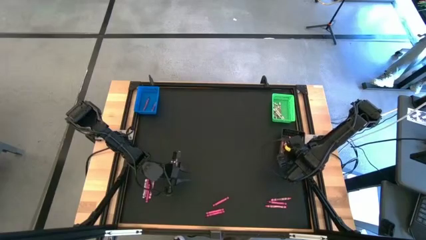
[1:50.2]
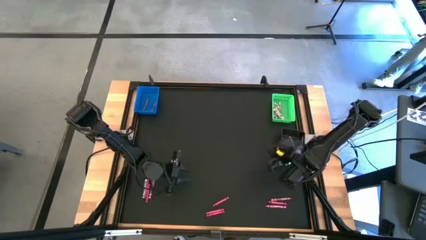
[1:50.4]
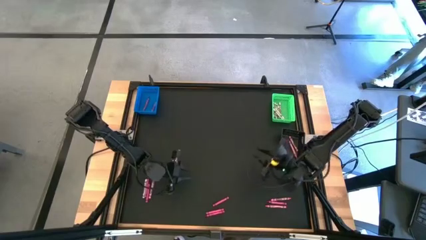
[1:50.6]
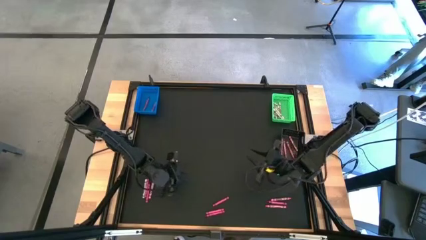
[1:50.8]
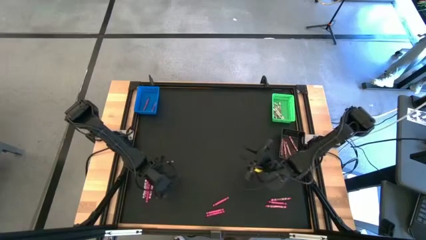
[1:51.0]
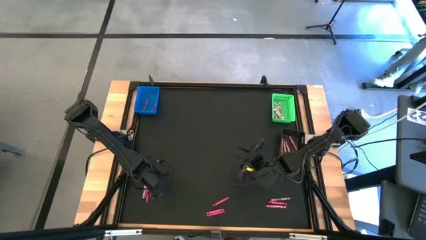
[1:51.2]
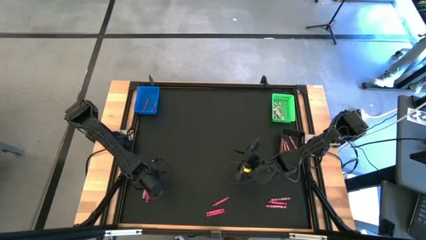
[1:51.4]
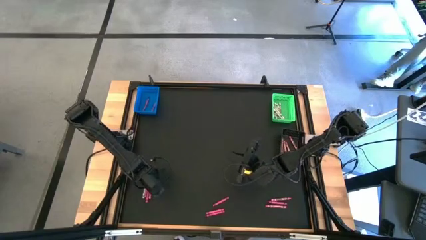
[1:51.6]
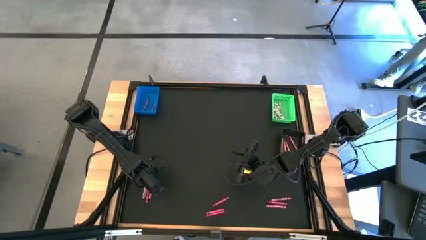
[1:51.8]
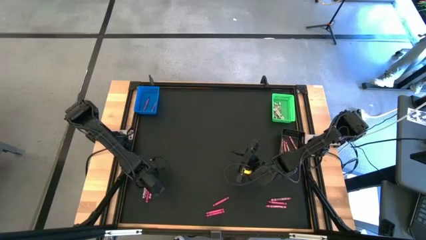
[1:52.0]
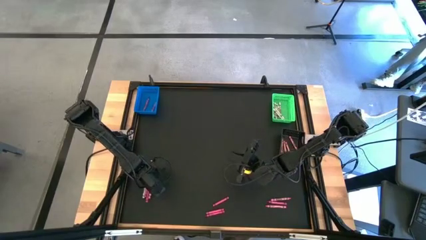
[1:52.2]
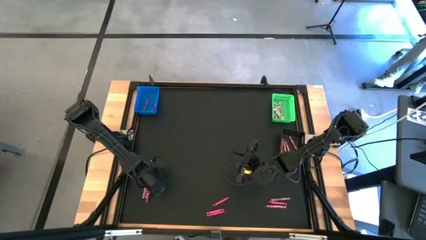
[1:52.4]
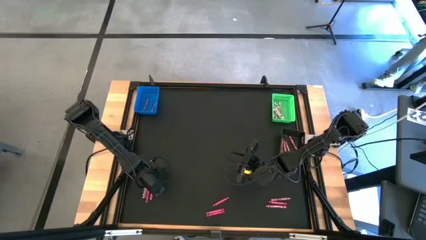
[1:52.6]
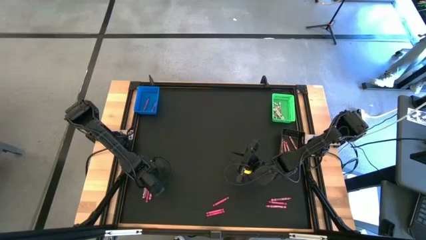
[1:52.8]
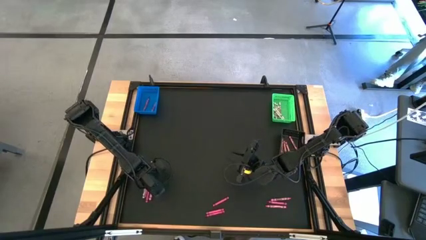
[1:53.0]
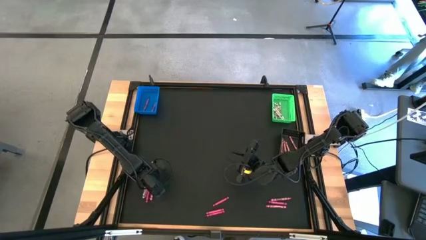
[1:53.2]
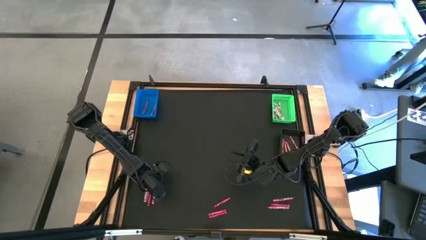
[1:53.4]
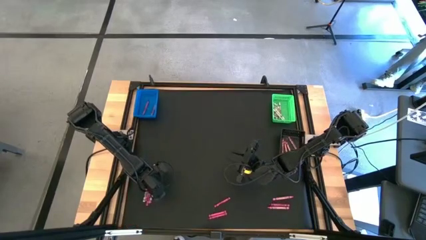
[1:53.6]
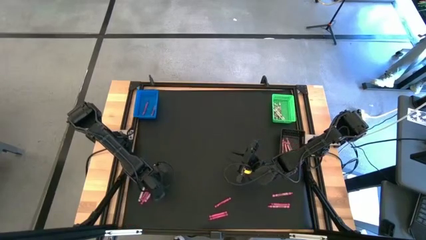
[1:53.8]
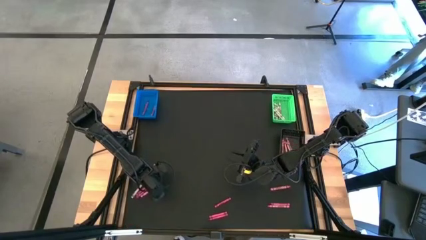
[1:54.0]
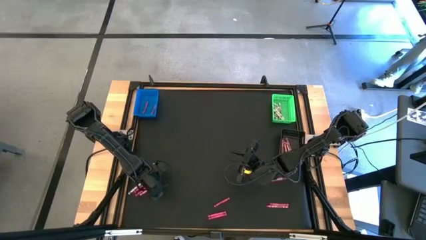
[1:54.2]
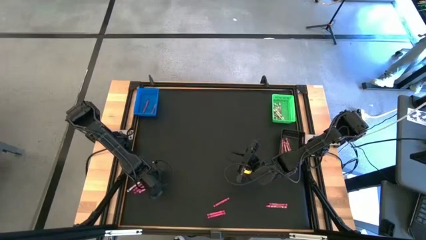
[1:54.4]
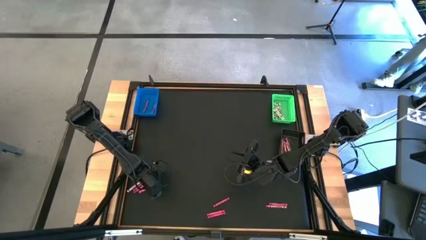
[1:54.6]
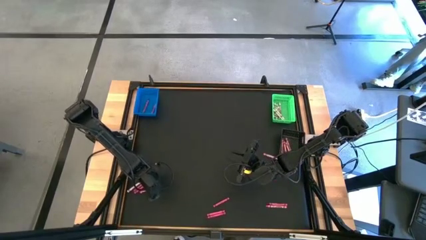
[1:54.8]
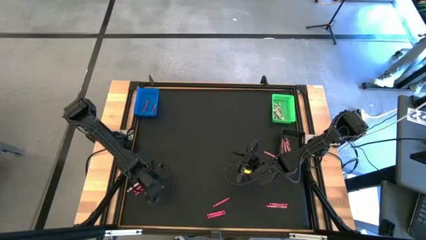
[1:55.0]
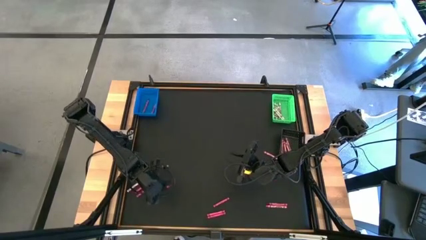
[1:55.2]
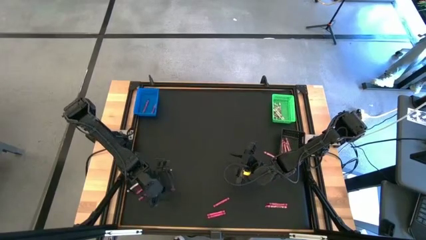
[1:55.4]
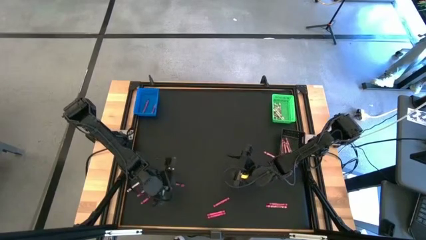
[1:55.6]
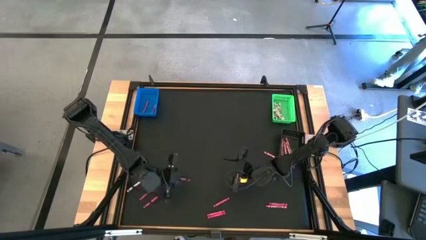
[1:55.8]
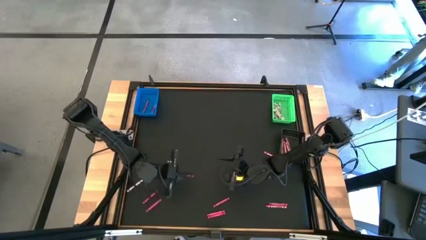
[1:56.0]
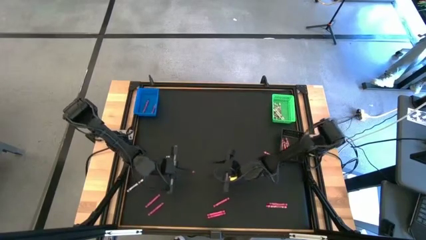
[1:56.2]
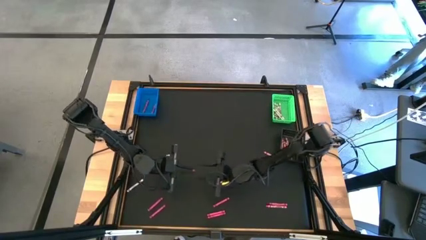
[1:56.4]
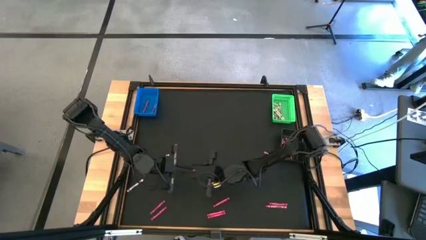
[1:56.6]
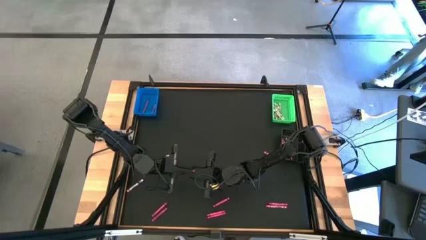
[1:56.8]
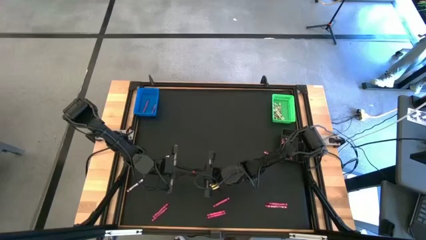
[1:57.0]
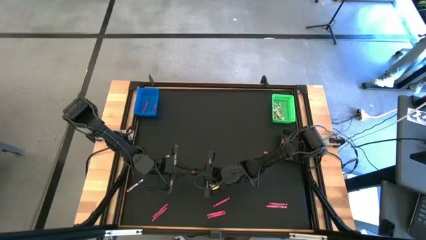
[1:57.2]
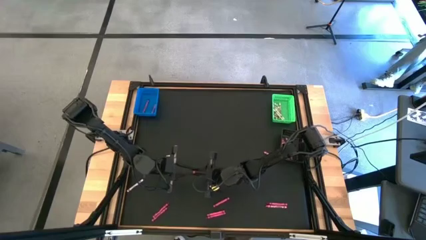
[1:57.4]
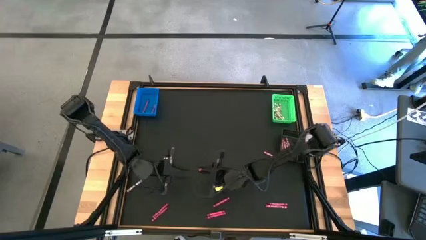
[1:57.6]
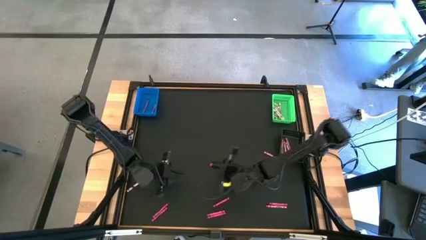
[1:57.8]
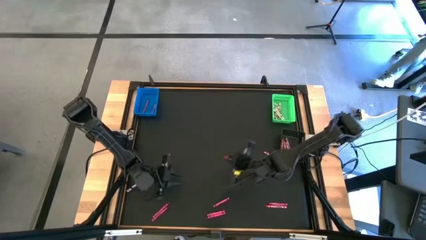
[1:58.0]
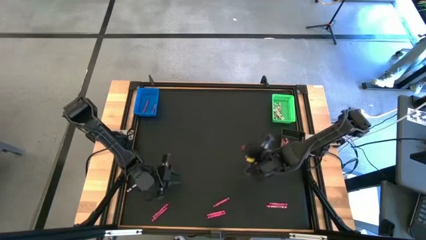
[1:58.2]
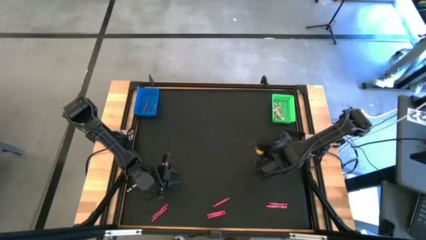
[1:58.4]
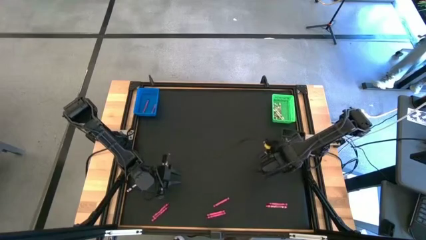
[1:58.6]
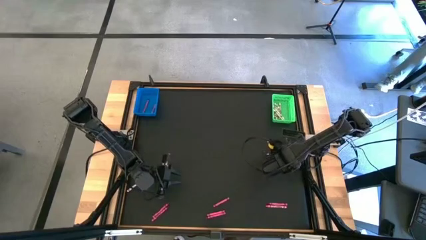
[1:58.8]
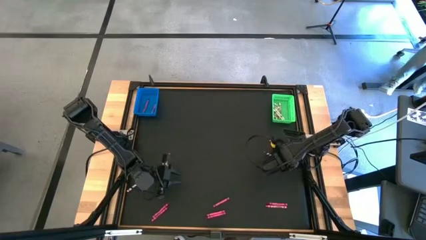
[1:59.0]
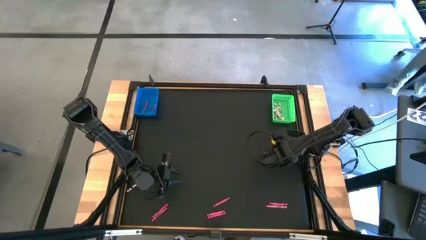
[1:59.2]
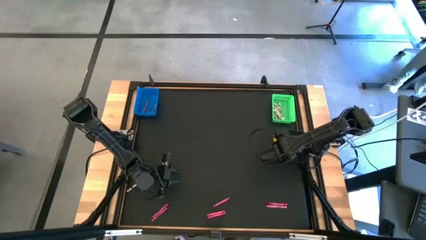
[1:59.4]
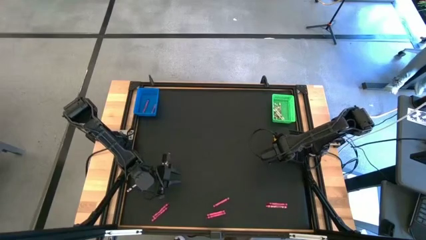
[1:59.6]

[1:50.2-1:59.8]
Task: Sort crayons
Put the pink crayon into the black bin

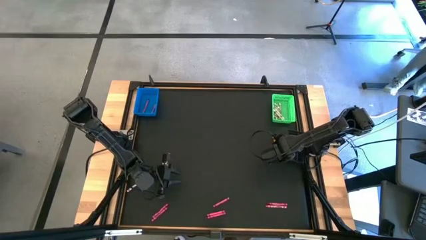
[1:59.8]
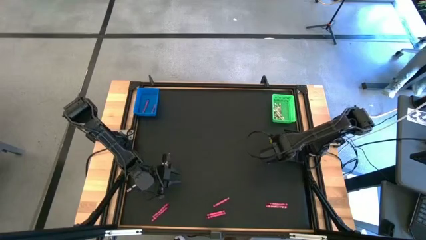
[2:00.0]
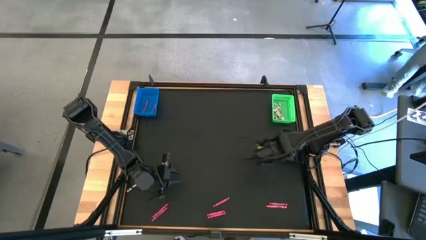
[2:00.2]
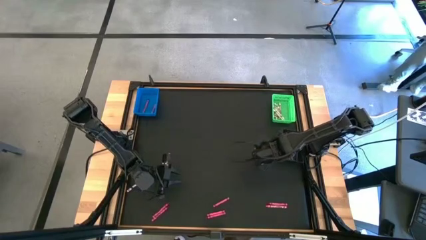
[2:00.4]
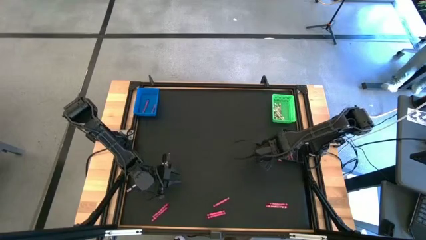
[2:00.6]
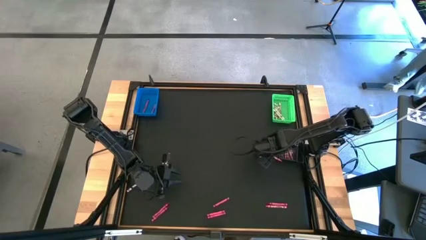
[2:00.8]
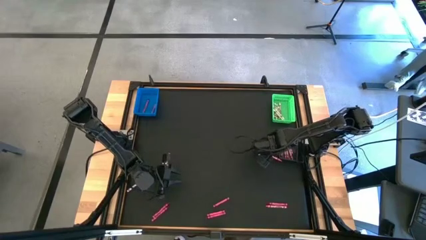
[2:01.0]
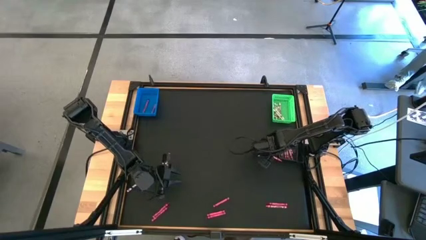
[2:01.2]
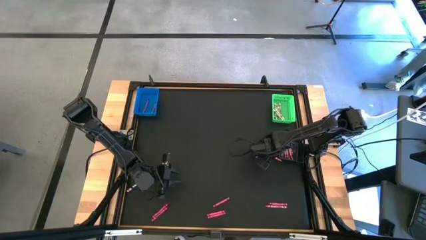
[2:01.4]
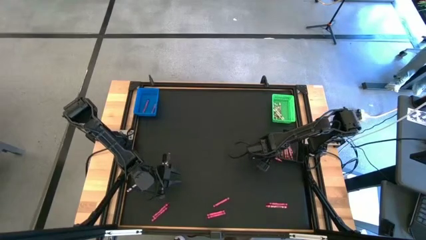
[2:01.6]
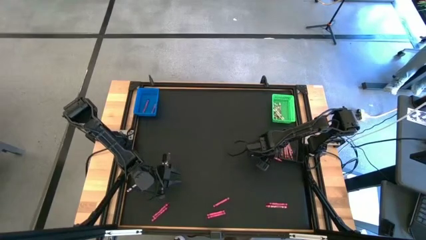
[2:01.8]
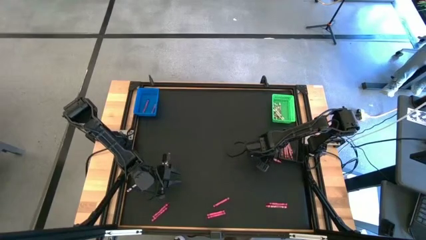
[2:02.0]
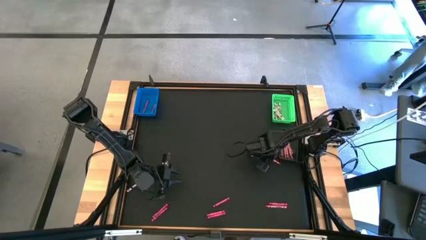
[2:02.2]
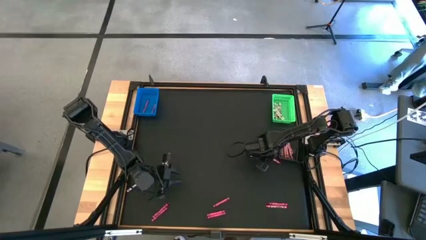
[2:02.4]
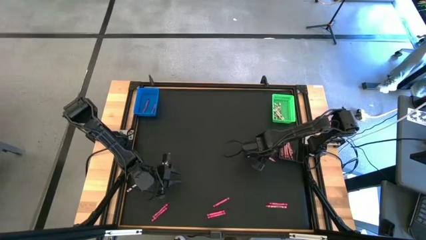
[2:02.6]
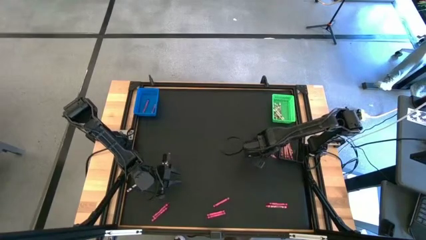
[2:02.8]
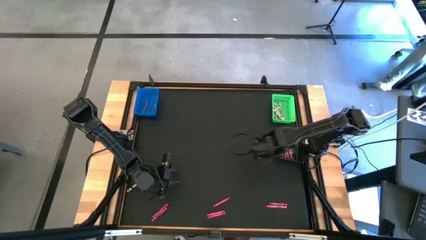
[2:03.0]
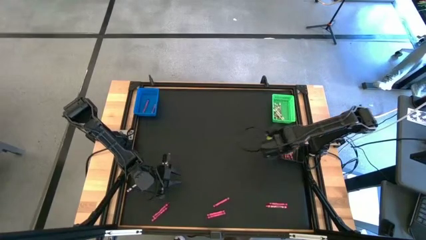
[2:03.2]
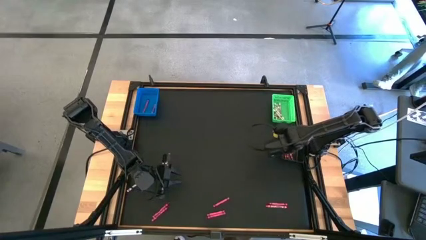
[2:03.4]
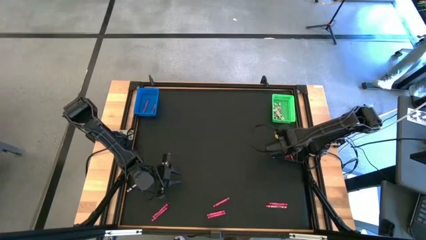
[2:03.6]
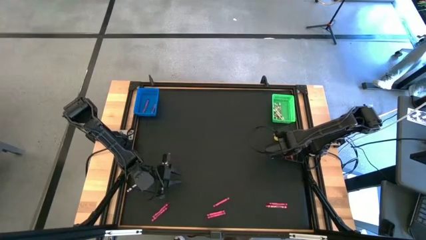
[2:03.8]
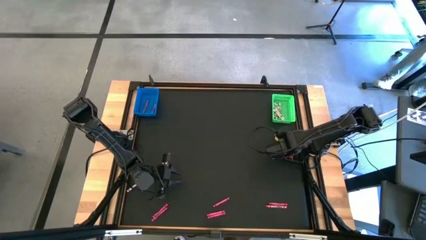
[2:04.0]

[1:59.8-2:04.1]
Put the pink crayon into the black bin

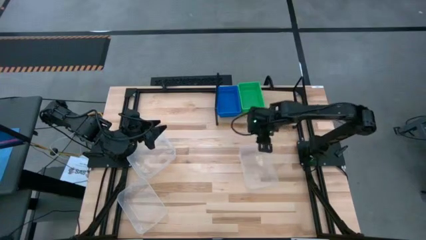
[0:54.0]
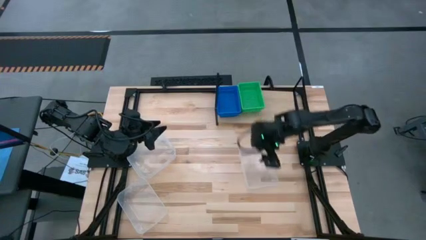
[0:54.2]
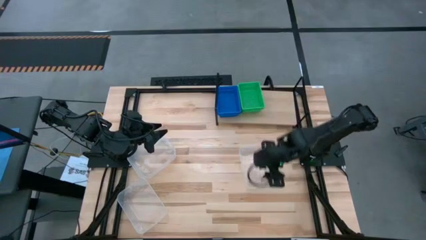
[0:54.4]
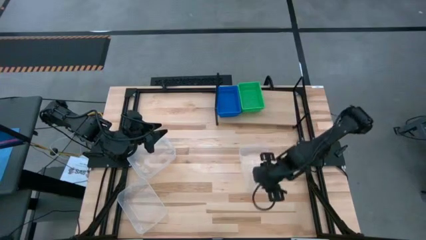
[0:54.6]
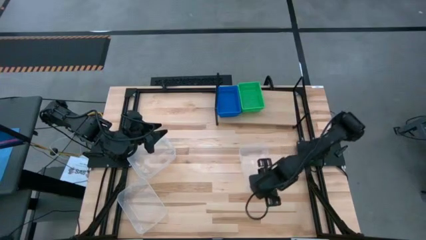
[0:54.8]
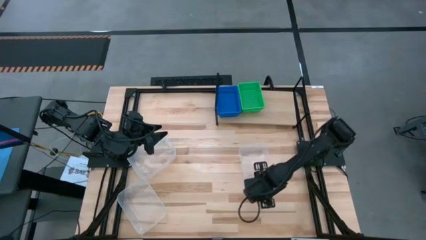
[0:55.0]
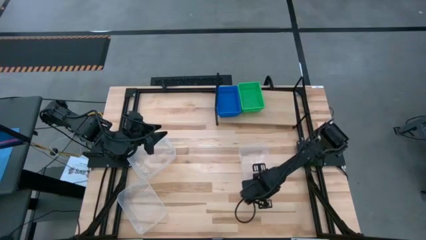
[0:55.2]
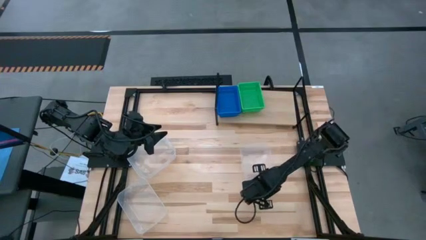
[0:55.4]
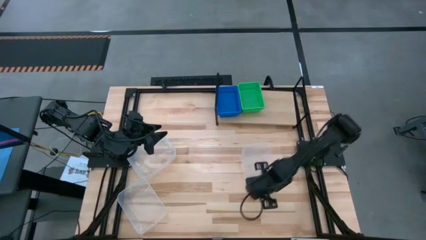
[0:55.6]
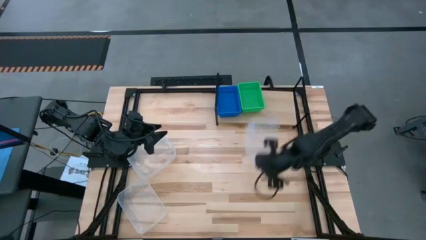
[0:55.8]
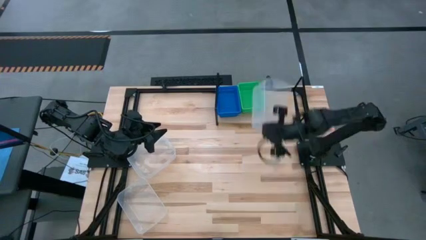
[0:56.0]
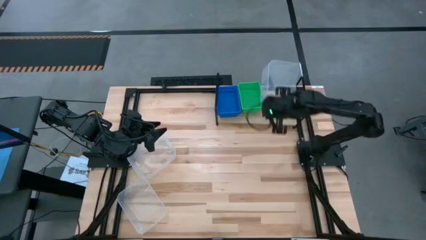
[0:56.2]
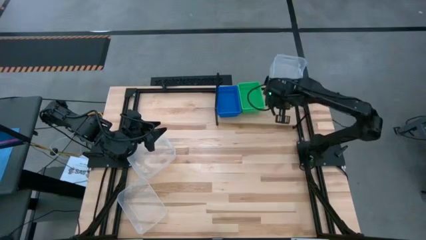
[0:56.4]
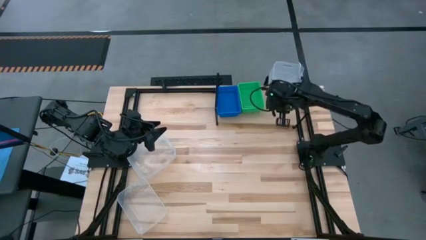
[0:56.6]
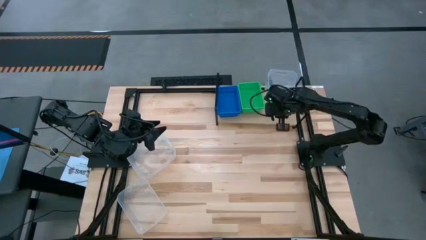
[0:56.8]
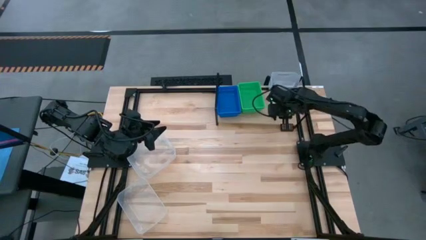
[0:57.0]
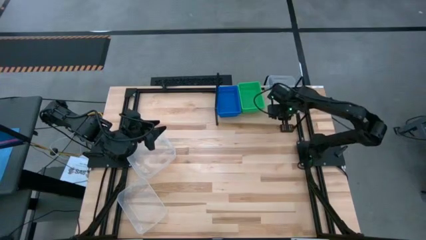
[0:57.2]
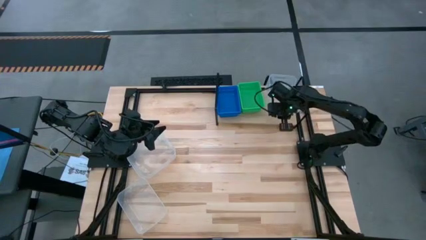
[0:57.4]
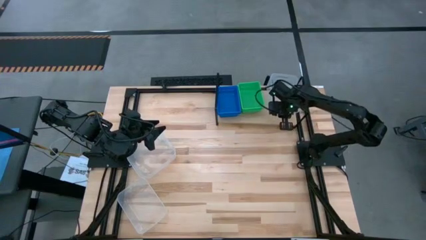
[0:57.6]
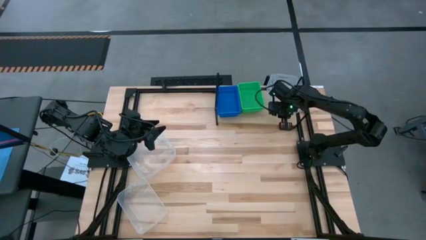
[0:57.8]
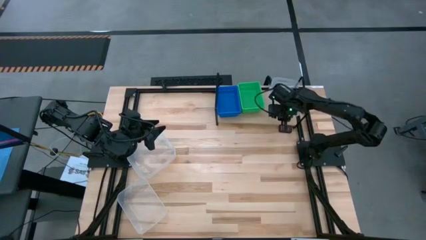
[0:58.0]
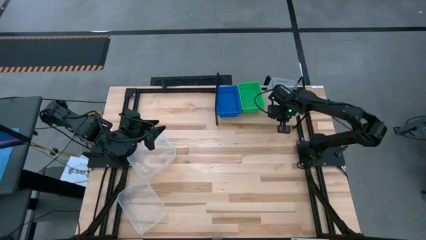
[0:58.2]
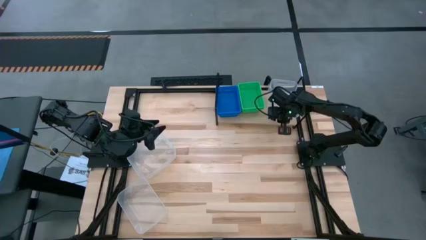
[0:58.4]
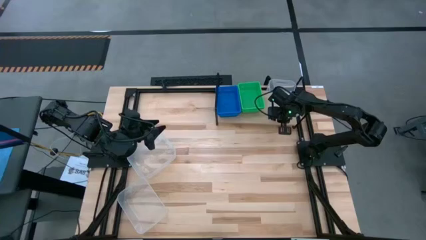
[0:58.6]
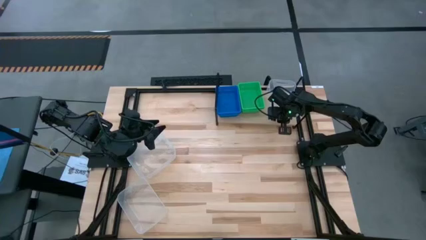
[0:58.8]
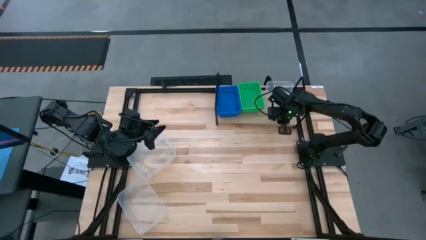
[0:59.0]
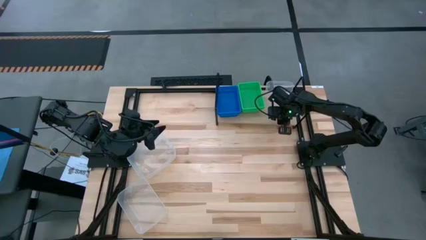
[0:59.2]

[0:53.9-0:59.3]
Task: Stack baskets on shelf by color
Put the right transparent bin on the shelf
